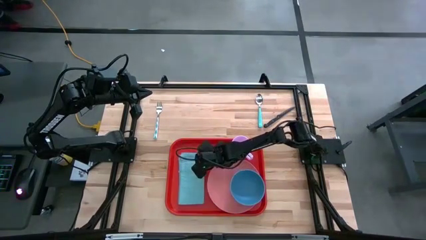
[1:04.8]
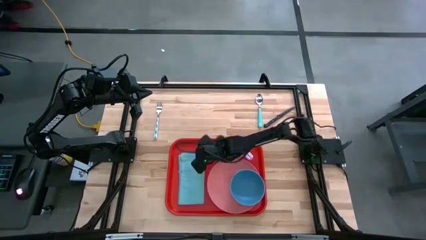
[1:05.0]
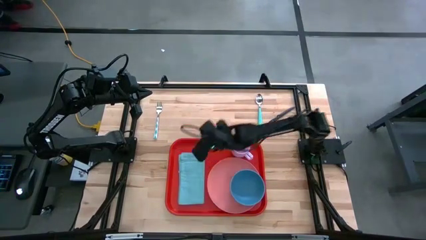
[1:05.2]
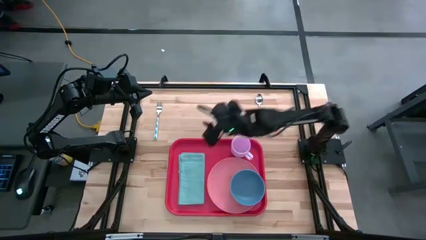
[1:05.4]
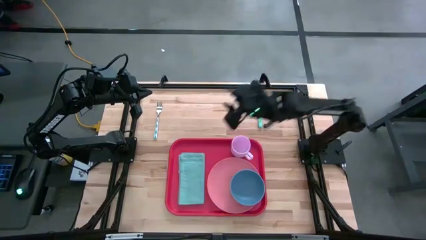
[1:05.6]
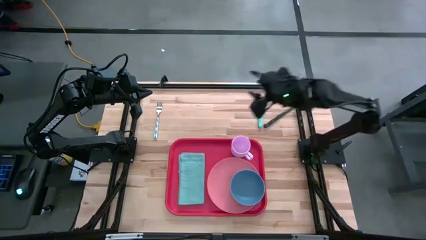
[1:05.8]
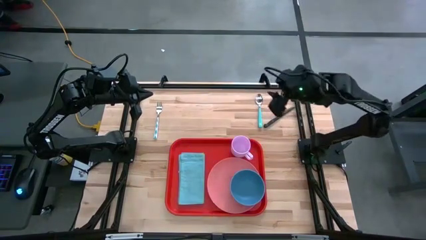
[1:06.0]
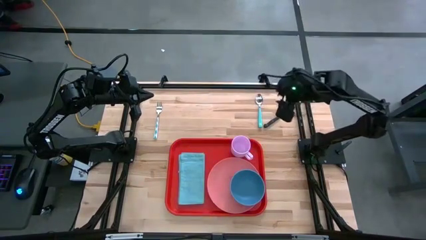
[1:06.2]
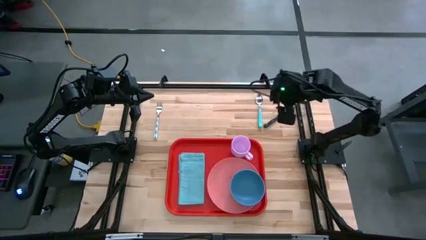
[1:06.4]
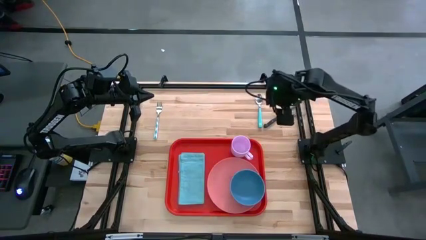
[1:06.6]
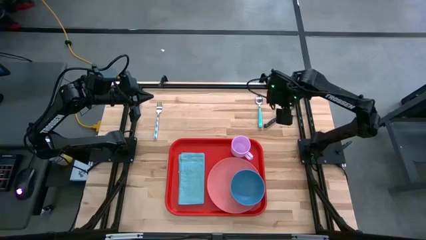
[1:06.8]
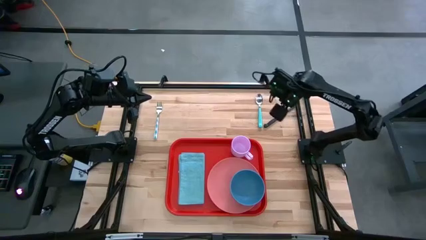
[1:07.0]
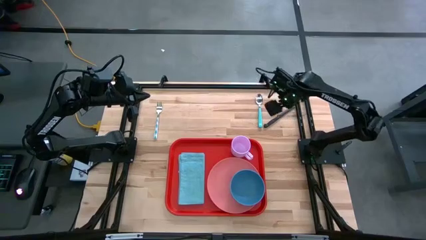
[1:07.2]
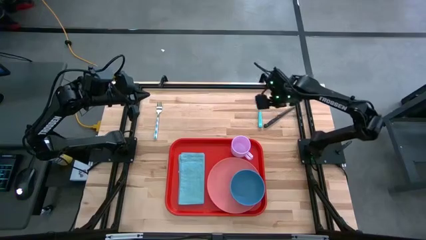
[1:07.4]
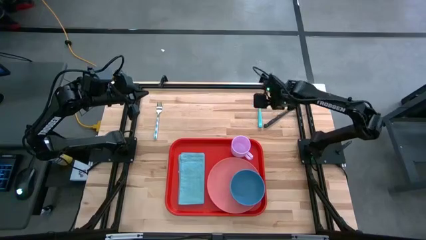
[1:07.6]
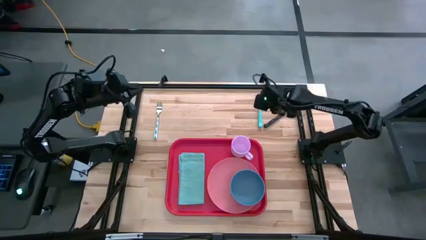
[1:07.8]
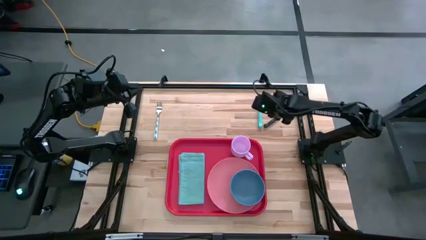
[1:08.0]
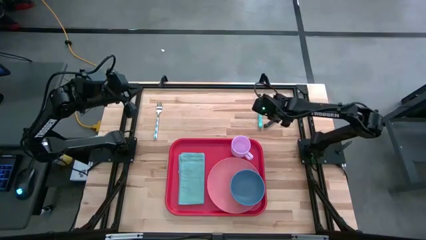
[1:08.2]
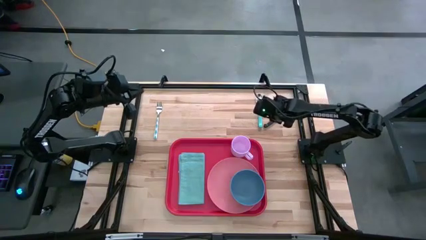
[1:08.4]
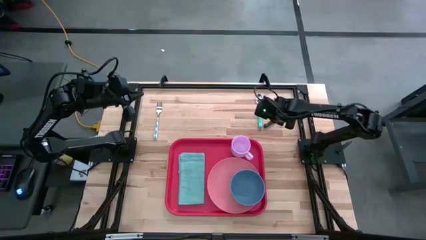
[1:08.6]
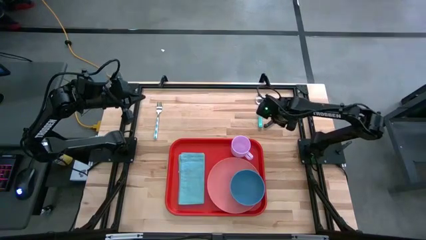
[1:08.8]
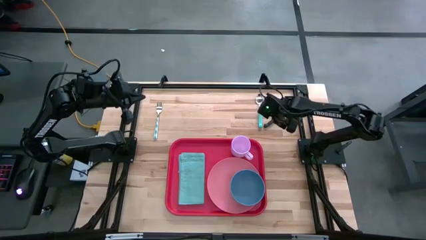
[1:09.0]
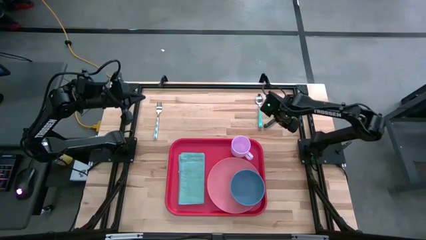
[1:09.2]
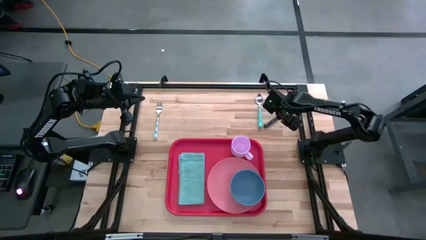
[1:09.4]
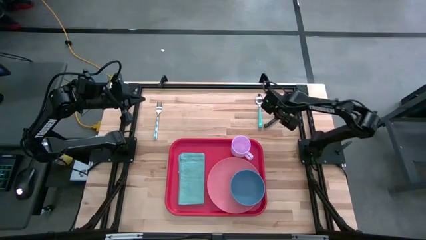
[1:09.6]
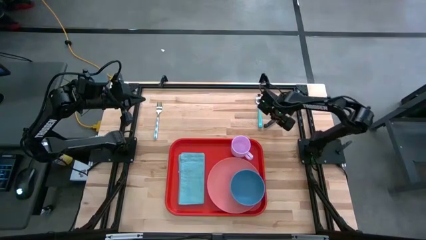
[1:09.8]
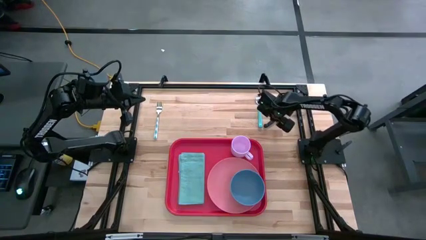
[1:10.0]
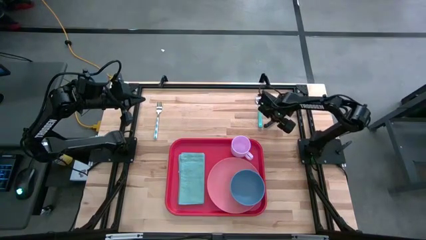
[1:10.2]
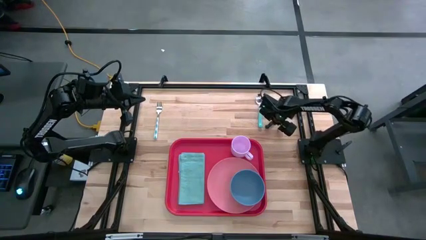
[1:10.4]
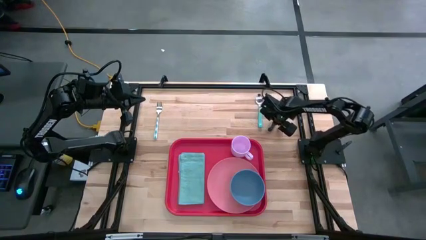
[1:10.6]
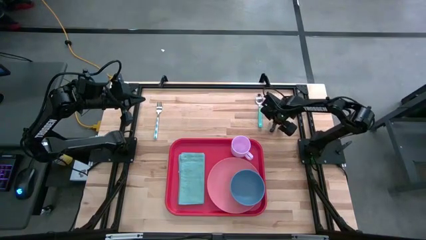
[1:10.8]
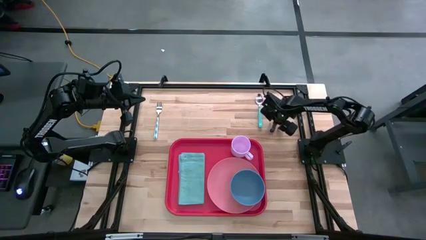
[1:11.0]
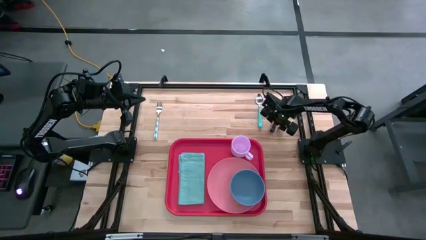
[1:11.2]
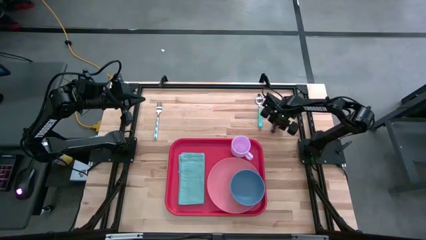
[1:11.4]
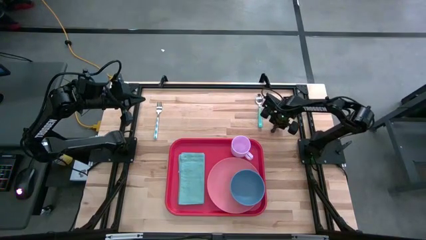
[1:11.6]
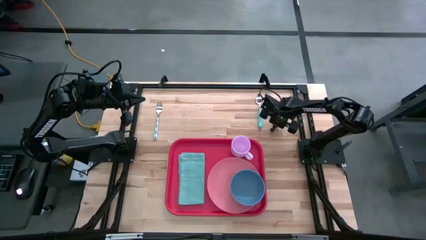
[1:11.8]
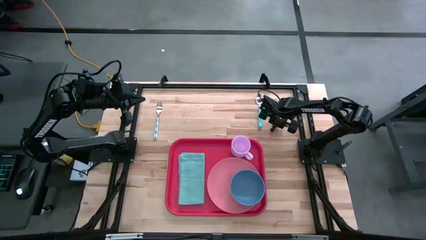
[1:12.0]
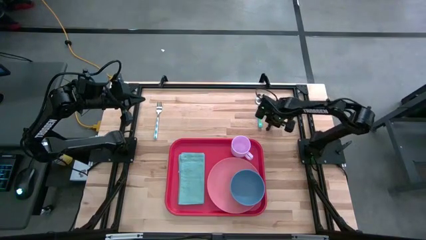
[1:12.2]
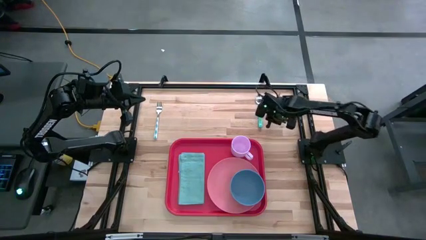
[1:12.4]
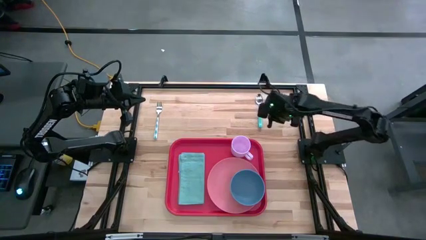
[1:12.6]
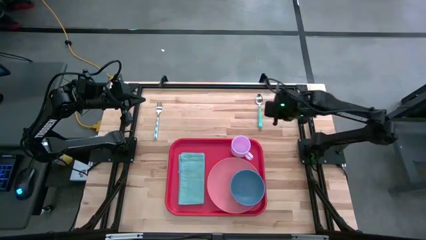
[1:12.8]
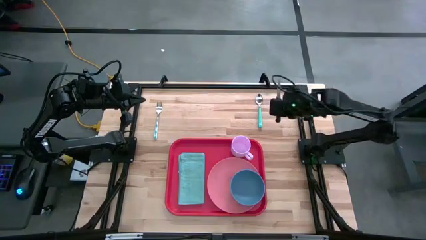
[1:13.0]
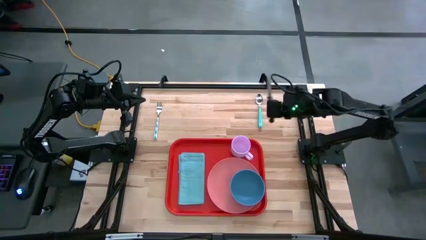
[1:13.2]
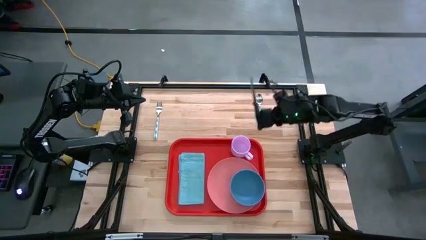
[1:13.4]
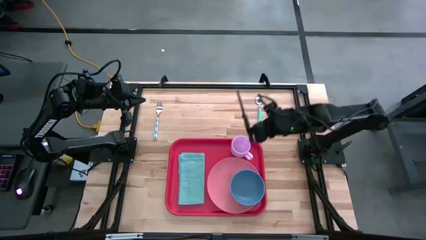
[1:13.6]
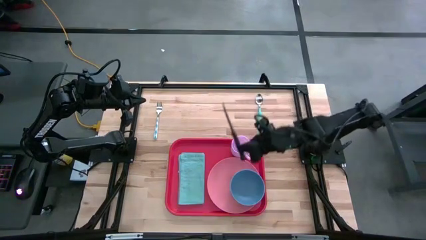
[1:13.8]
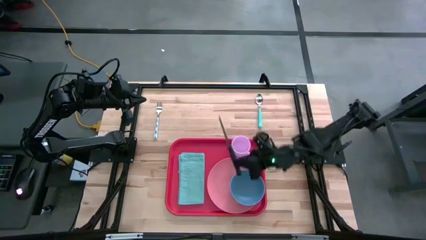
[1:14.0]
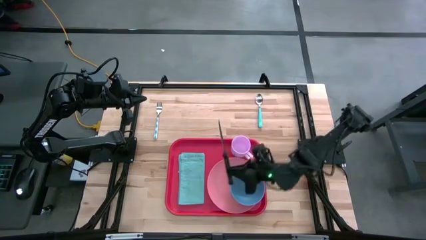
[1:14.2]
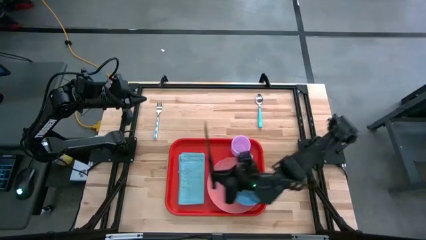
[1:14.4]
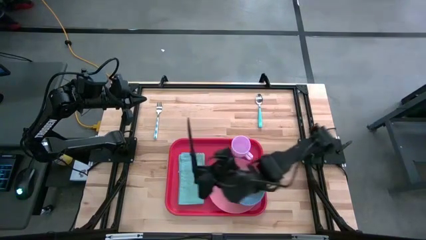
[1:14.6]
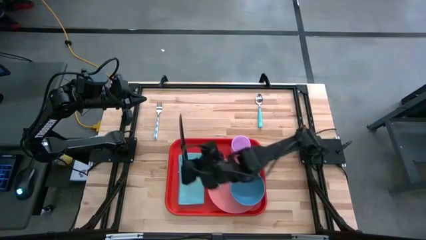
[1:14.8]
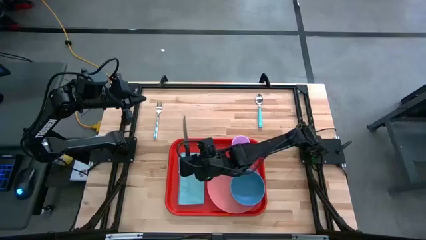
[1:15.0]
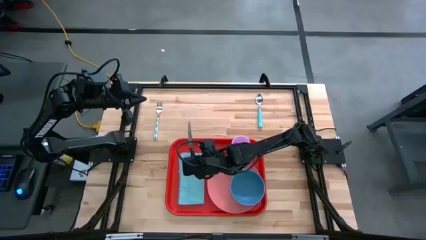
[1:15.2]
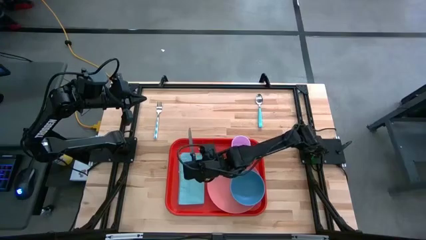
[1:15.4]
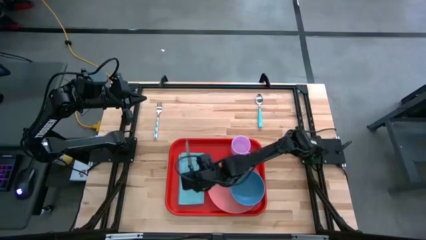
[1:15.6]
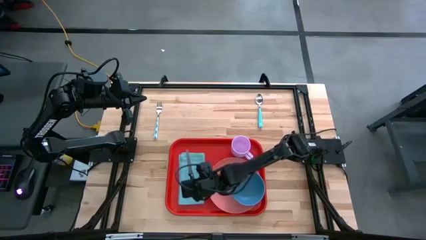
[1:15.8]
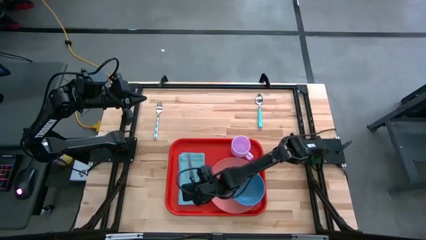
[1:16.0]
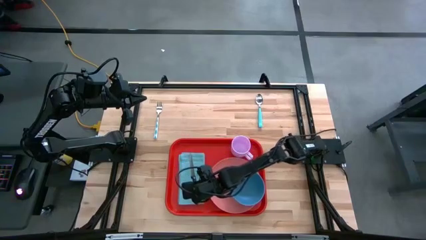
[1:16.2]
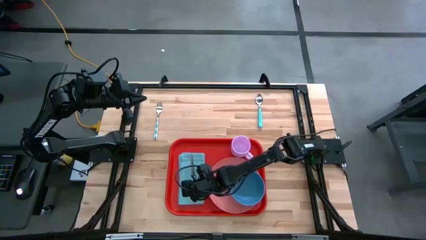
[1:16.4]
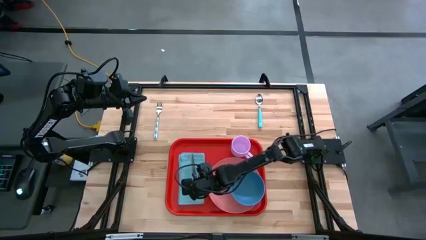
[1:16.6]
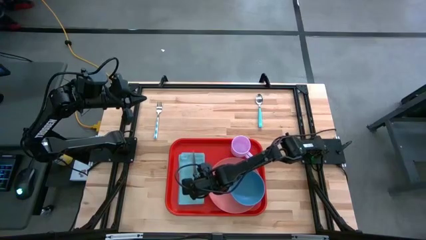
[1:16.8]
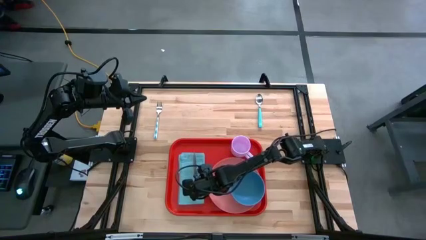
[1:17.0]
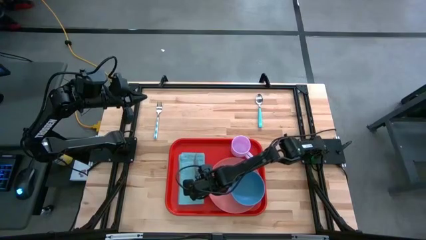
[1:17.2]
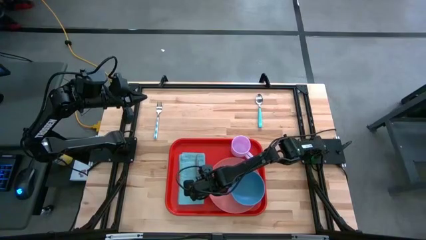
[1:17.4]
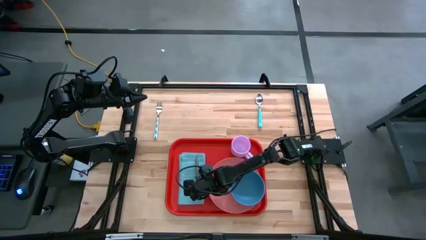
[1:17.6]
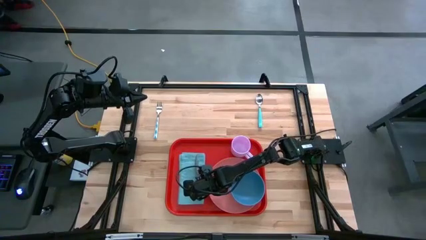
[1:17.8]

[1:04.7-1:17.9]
Task: Set up tray
Put the black knife on the blue napkin on the red serving tray
